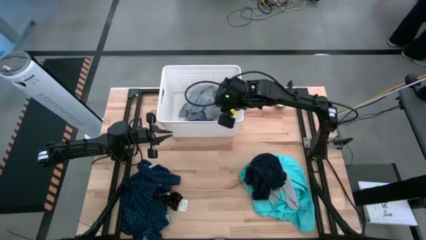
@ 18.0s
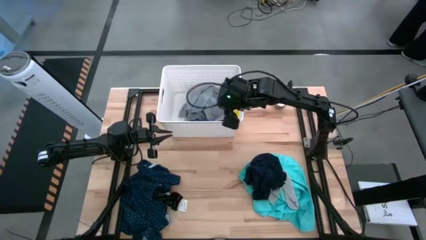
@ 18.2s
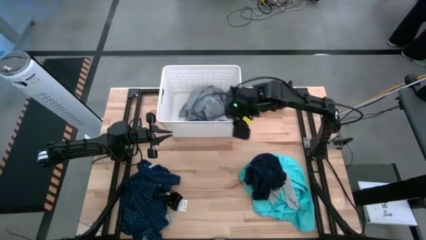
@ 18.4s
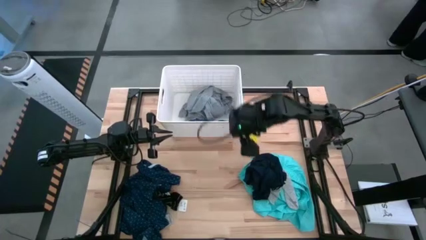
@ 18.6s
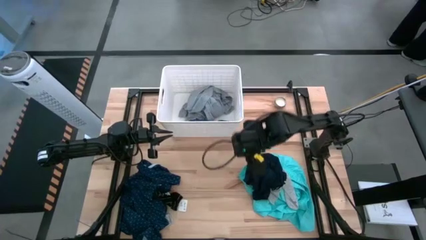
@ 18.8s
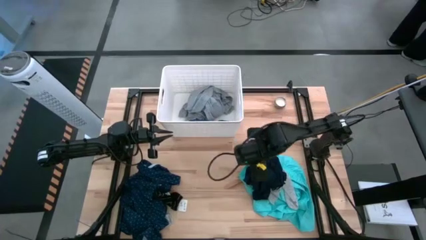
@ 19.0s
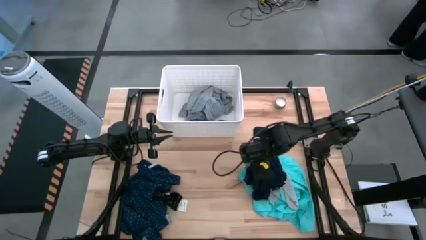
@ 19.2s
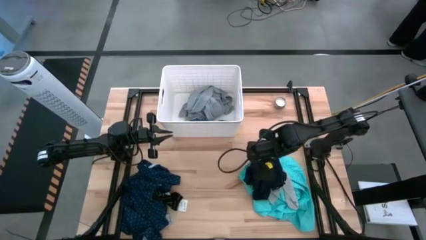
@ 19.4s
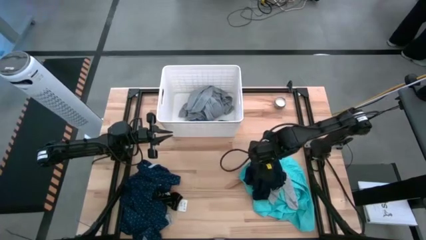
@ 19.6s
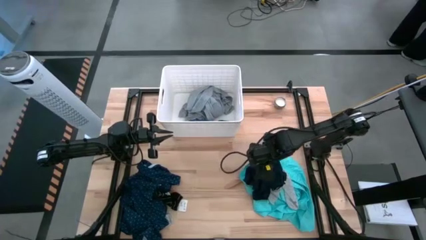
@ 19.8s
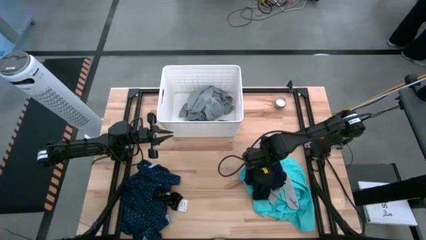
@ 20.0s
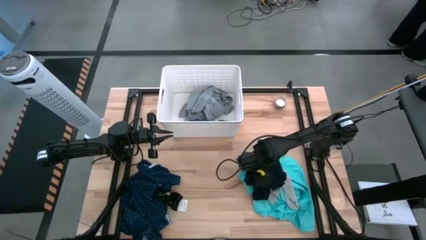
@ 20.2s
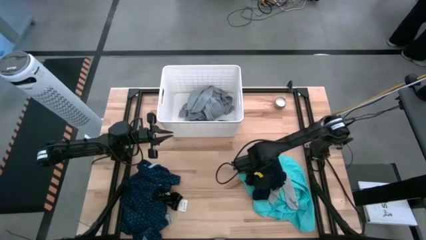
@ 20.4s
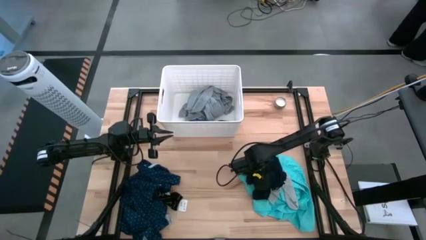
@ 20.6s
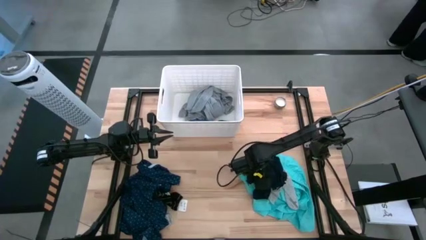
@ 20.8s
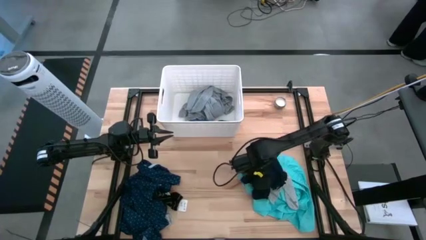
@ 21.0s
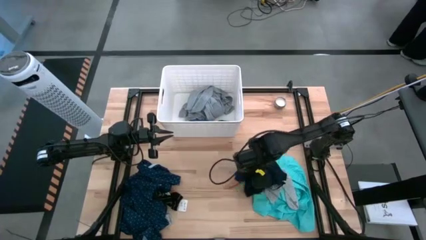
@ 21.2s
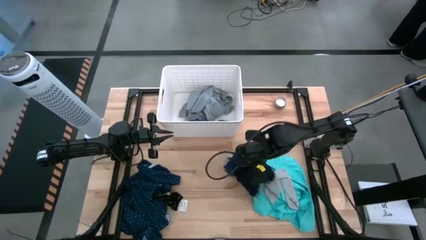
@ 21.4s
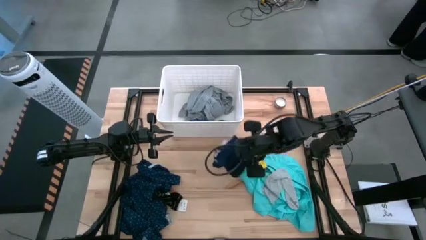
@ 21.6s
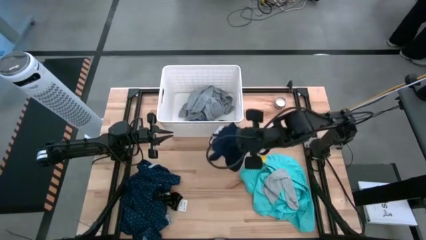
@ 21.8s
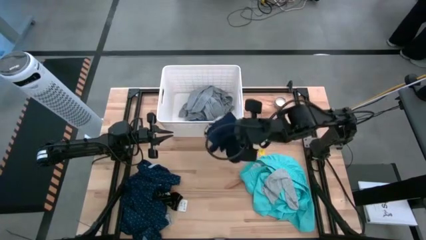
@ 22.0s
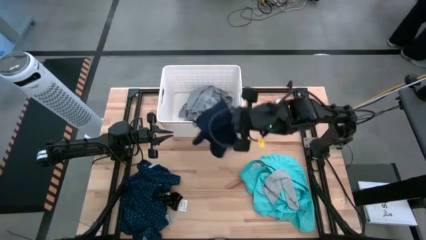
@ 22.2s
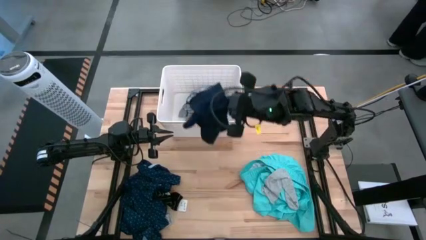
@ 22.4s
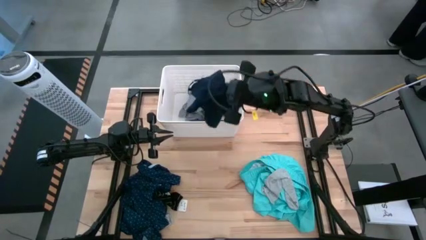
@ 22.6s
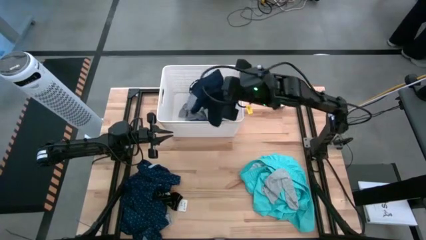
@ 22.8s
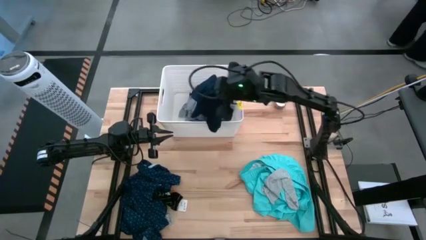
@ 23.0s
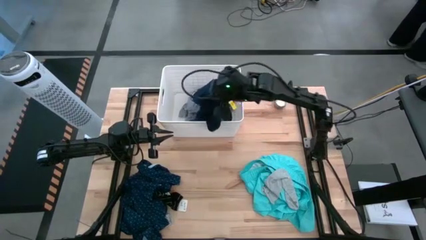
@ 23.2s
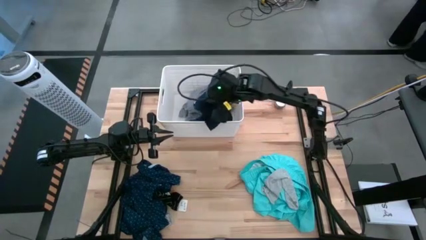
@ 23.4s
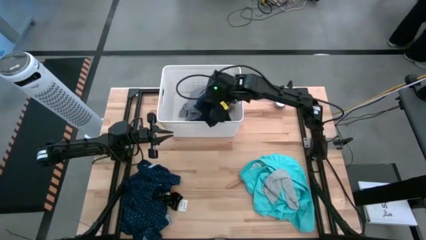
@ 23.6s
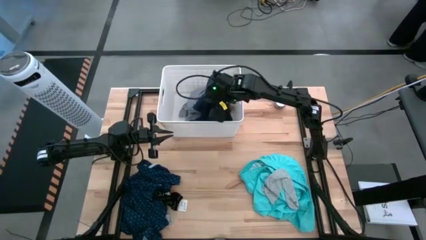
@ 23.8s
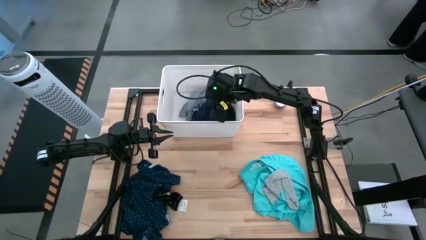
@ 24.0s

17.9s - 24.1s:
Task: Sort clothes
Put the dark blue boxer into the white laundry bin

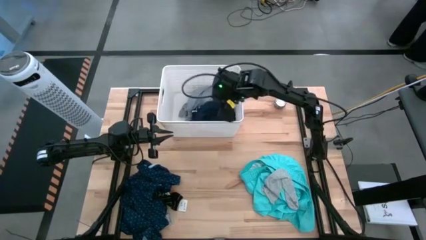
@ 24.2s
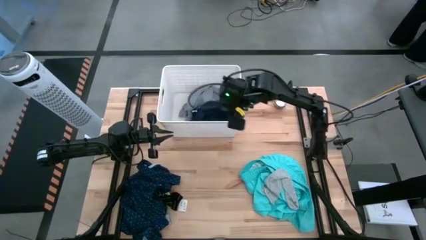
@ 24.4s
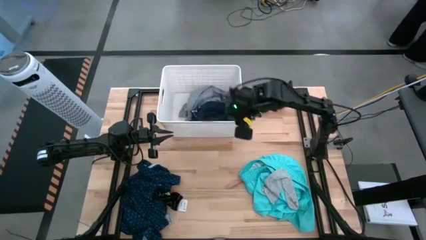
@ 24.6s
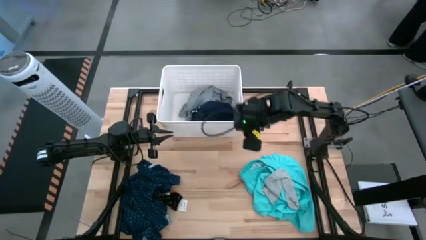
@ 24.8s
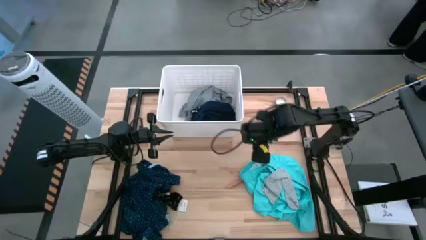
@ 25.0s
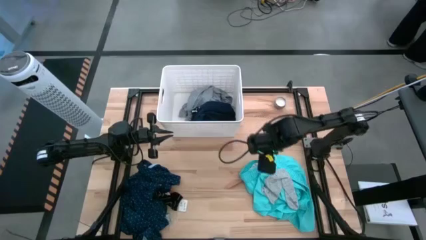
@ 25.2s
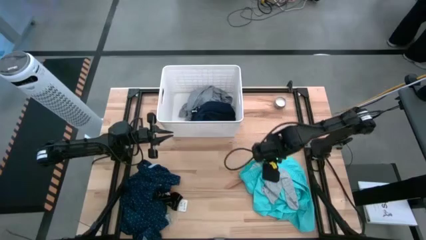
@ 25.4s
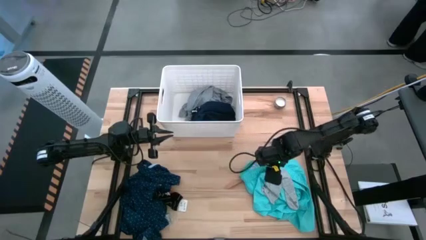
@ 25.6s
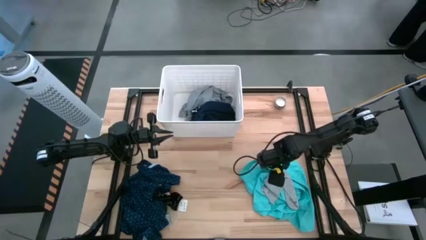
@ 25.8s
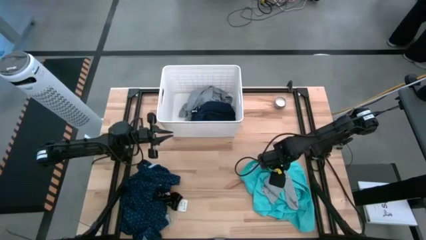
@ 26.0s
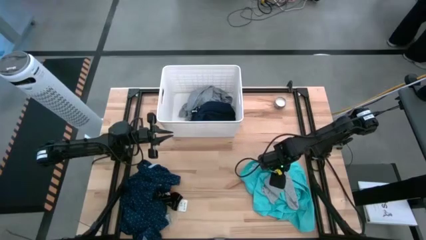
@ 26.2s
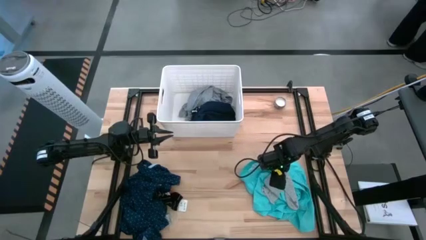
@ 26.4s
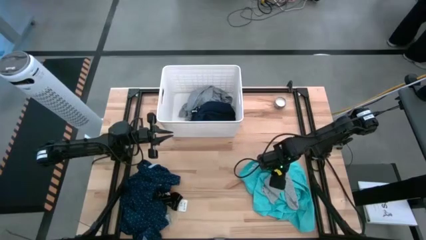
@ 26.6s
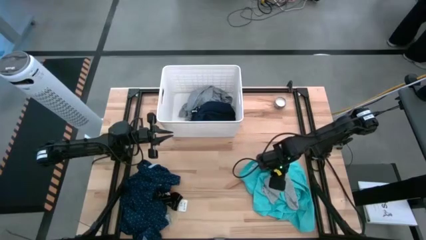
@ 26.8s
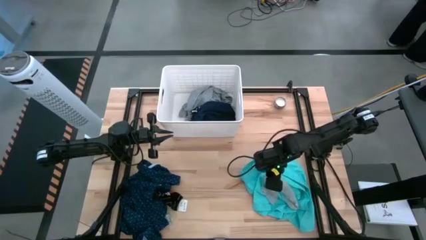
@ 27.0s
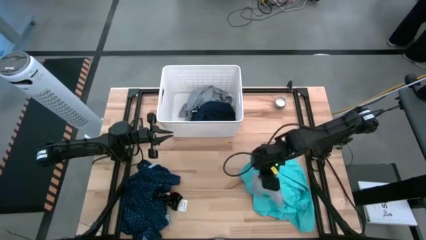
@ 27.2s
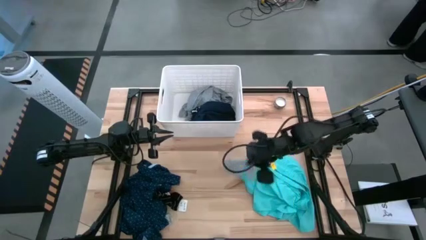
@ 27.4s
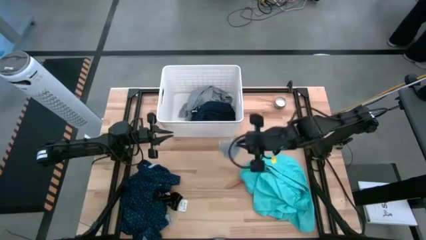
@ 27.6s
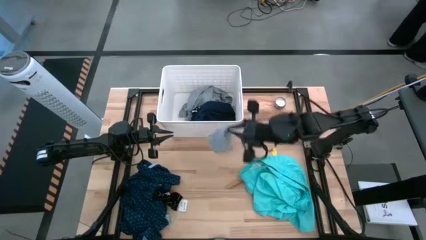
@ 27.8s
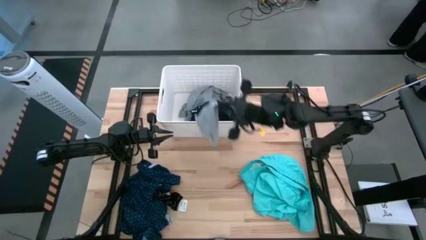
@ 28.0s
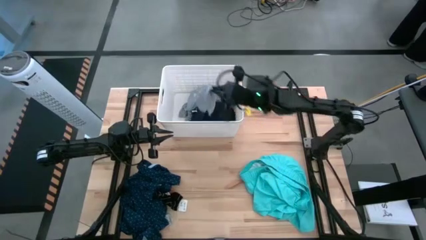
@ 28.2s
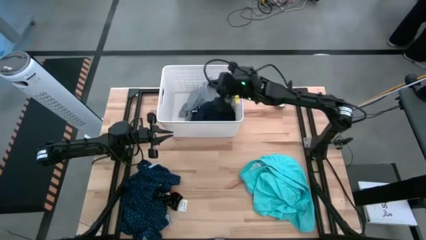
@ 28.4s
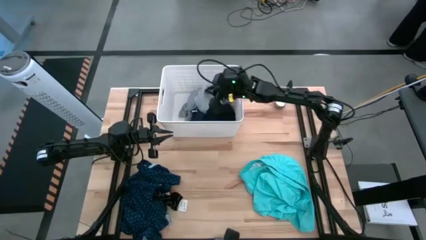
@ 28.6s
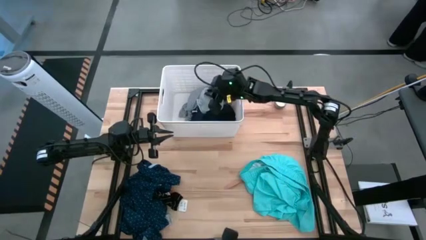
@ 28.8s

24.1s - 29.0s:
Put the gray sock into the white laundry bin

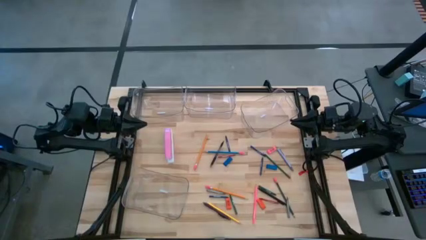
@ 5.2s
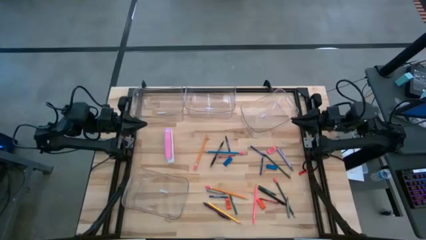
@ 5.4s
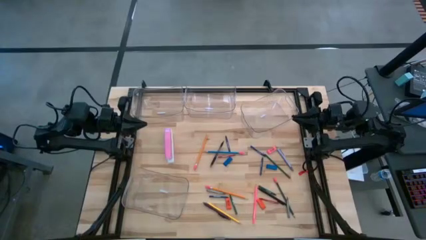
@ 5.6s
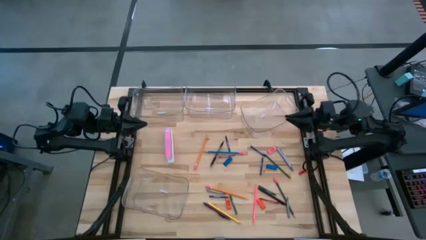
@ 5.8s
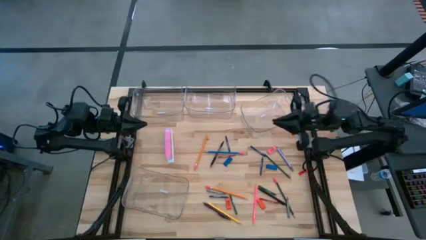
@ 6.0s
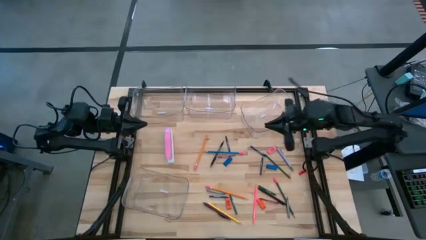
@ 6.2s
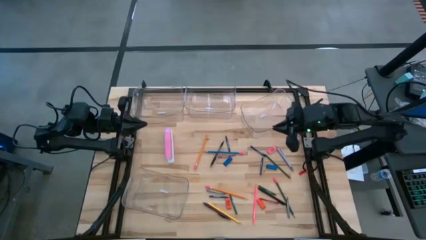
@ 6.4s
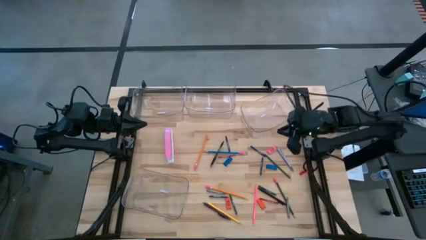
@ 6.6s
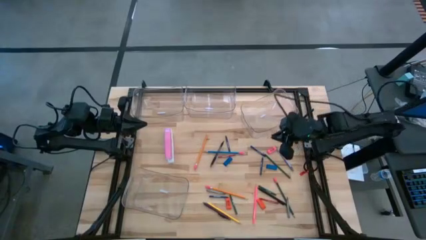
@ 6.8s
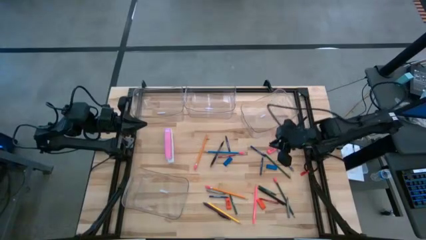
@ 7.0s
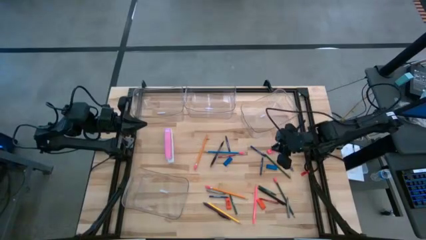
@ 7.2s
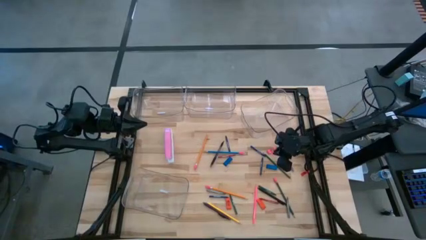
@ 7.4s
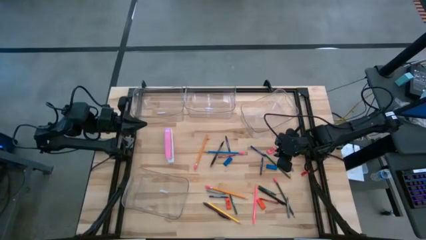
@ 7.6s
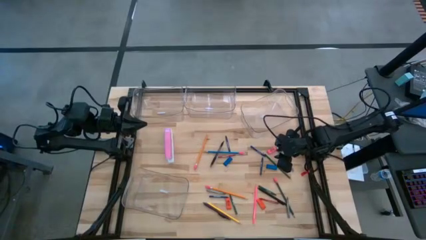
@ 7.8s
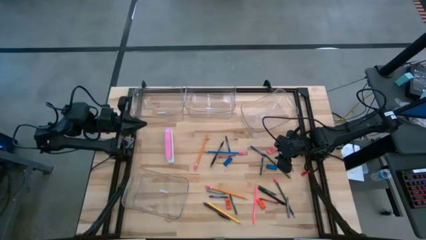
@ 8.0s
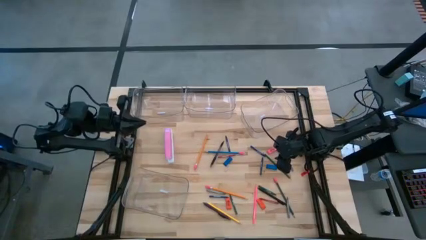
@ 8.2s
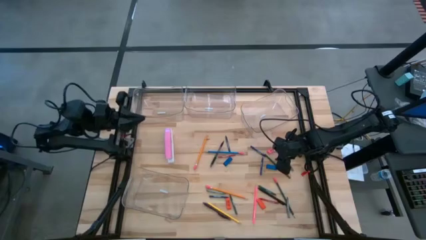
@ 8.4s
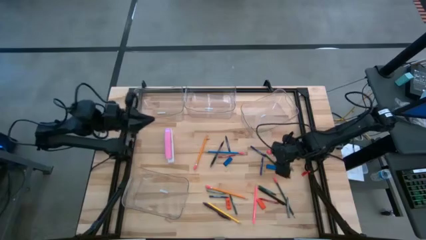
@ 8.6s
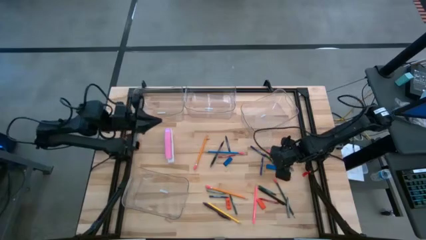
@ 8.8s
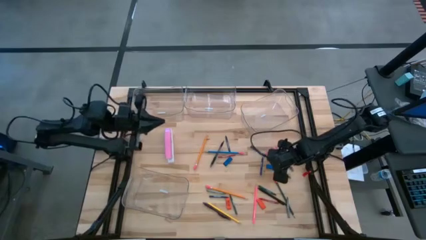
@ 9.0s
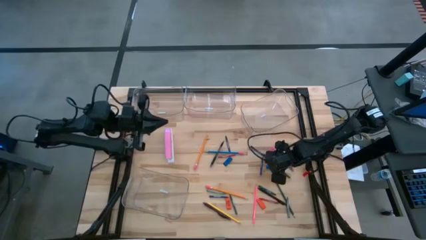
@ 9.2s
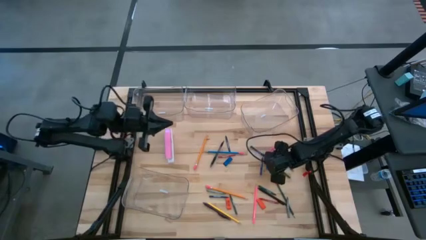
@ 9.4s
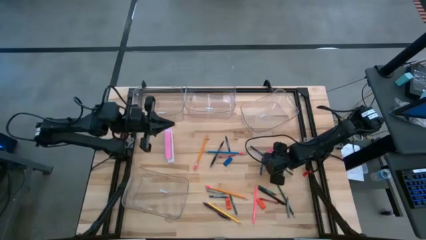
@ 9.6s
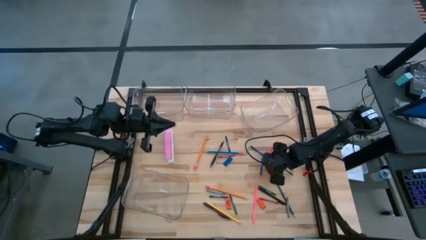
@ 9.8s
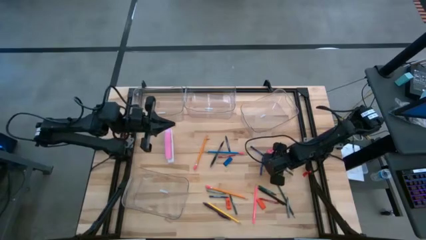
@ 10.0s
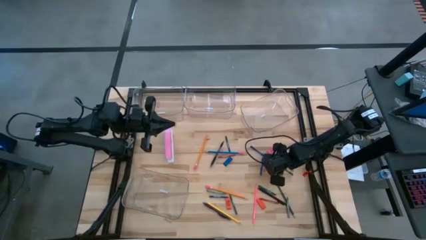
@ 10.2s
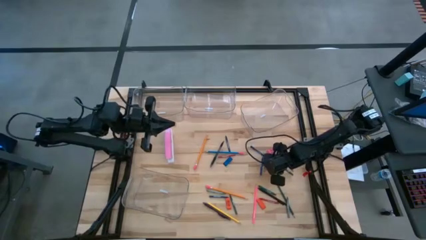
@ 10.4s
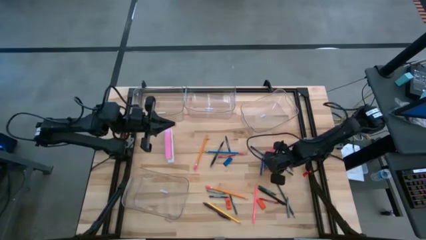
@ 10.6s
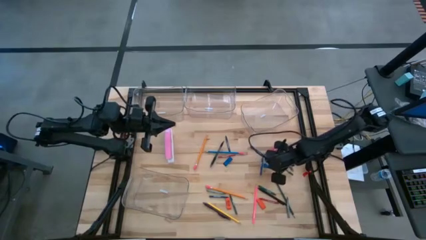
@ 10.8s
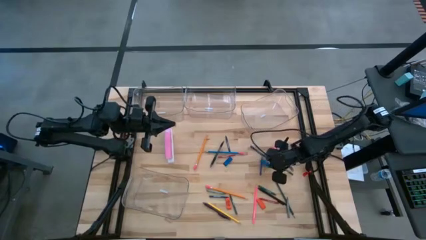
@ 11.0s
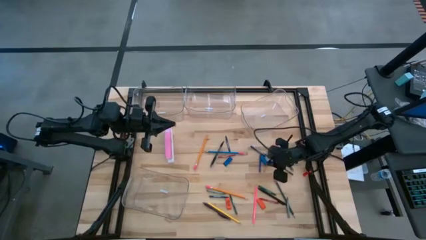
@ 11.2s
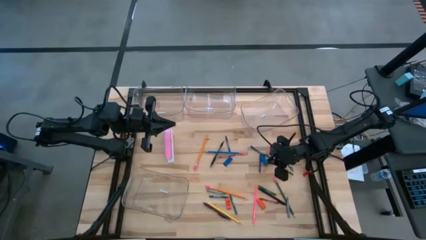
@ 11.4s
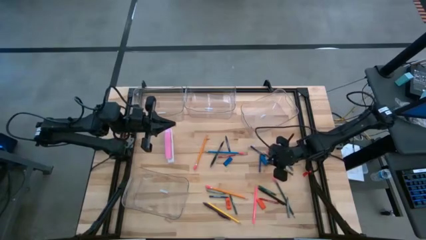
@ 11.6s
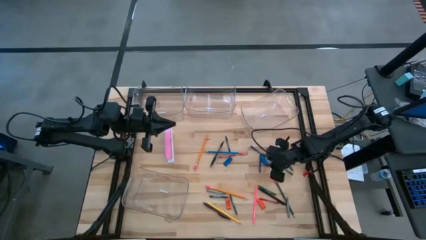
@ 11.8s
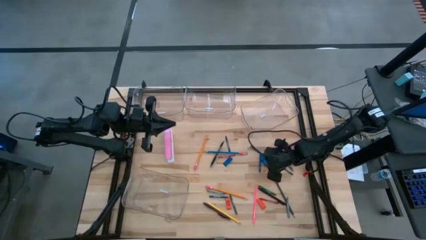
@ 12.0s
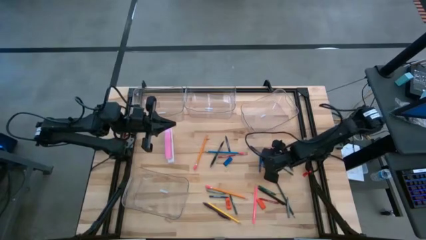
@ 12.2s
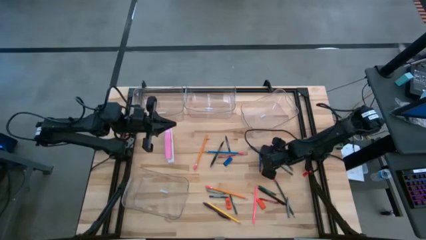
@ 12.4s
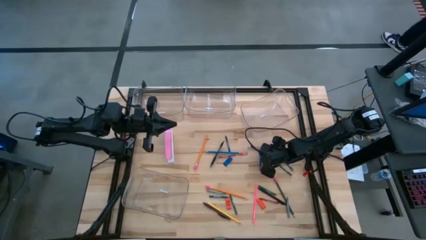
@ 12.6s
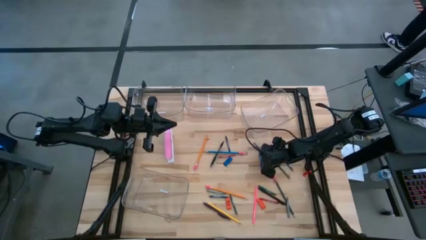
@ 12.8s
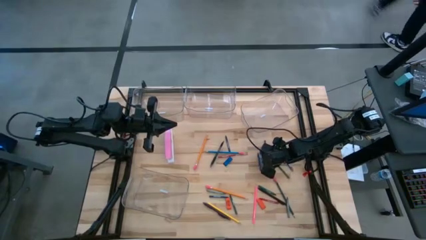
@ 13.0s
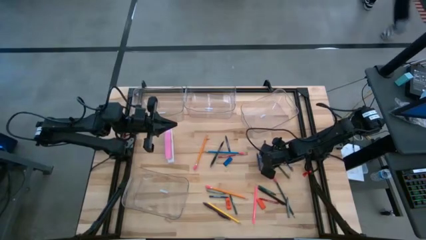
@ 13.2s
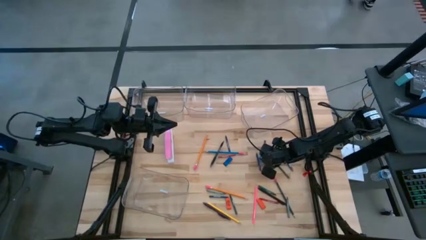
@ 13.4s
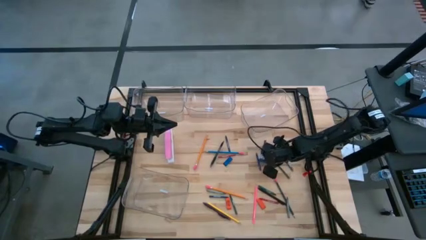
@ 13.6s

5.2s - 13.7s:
Task: Sort crayons/erasers/pens/pencils in bins
Put the blue eraser into the top right transparent bin
